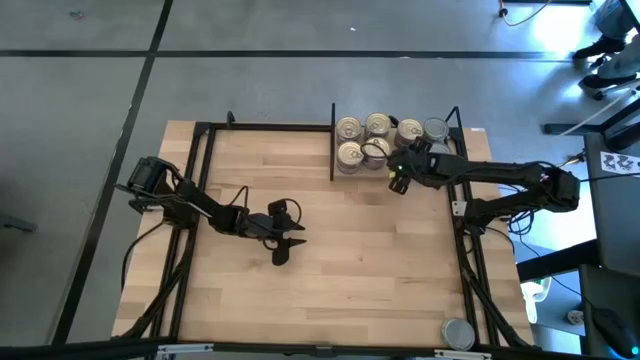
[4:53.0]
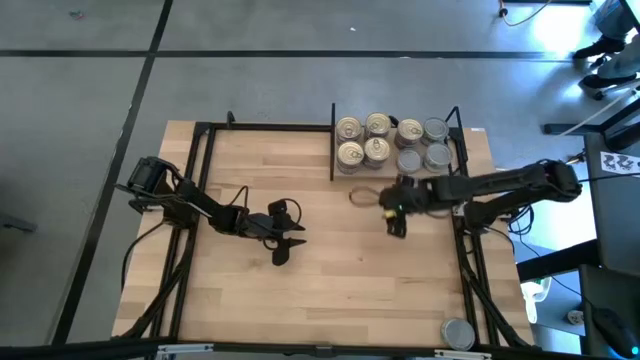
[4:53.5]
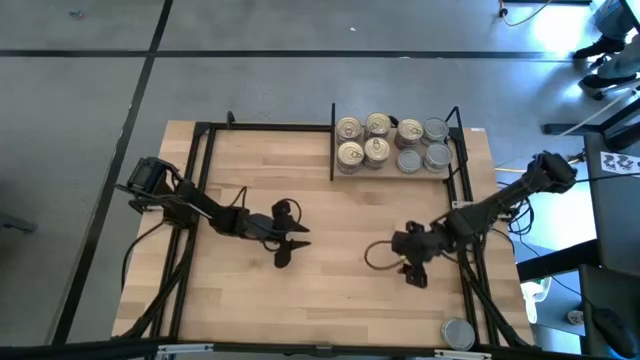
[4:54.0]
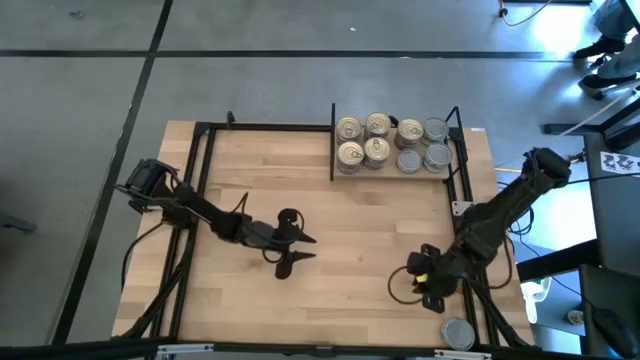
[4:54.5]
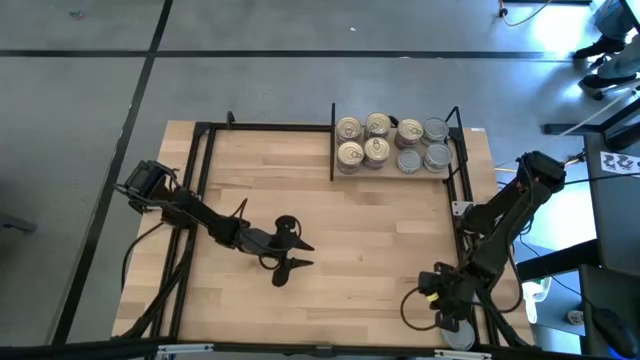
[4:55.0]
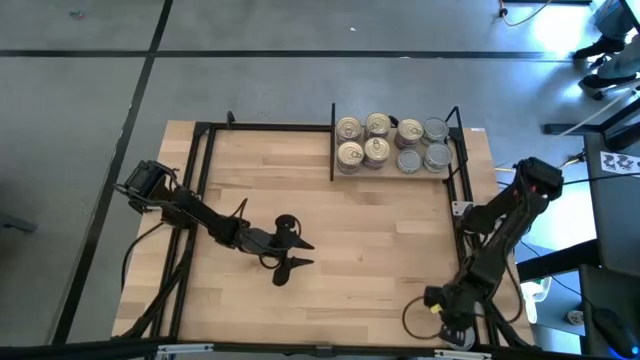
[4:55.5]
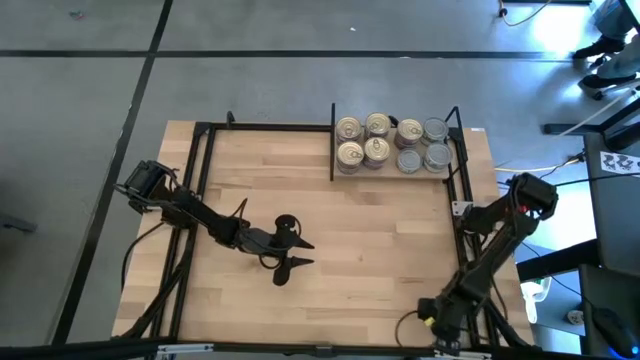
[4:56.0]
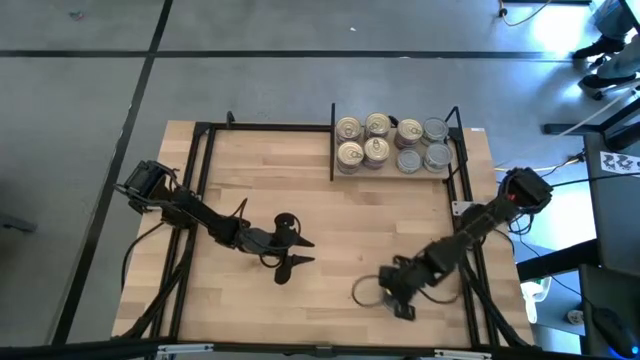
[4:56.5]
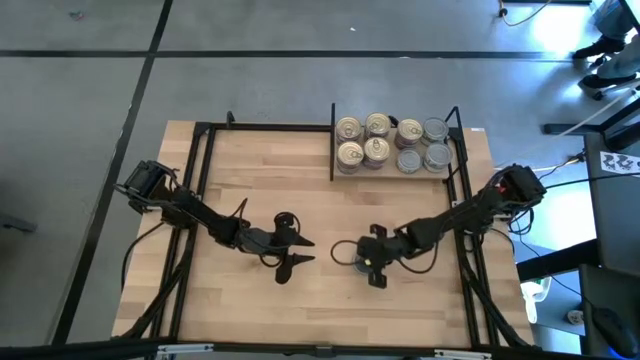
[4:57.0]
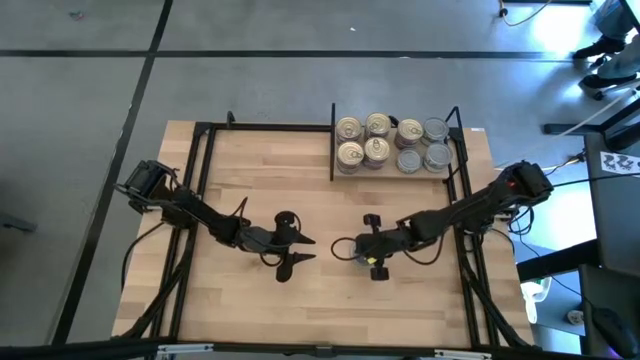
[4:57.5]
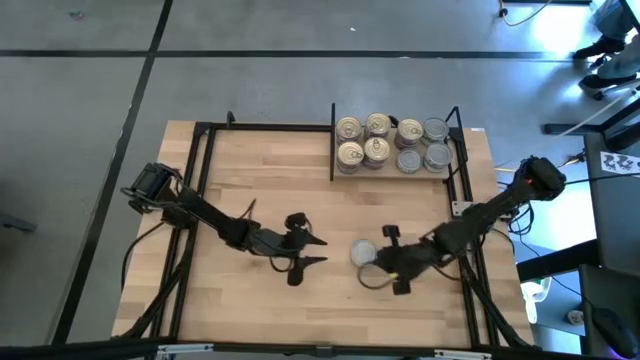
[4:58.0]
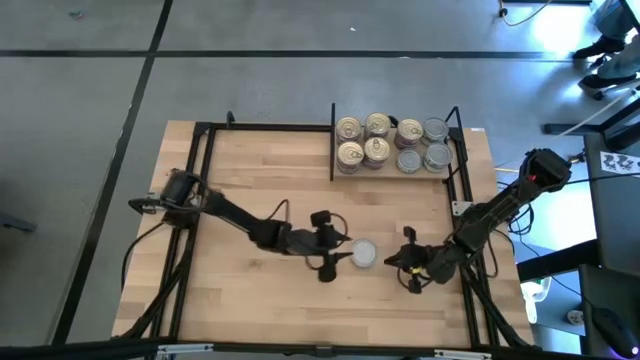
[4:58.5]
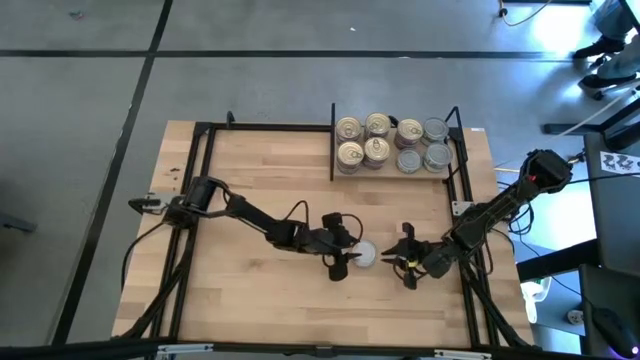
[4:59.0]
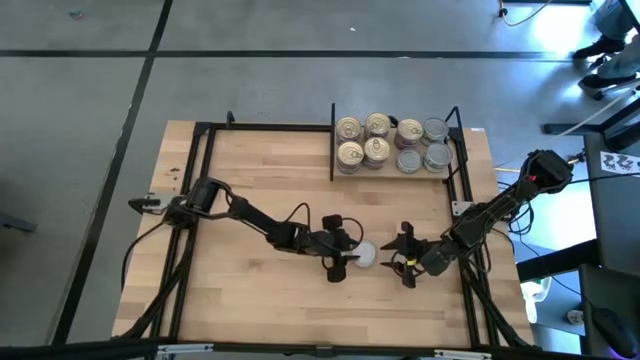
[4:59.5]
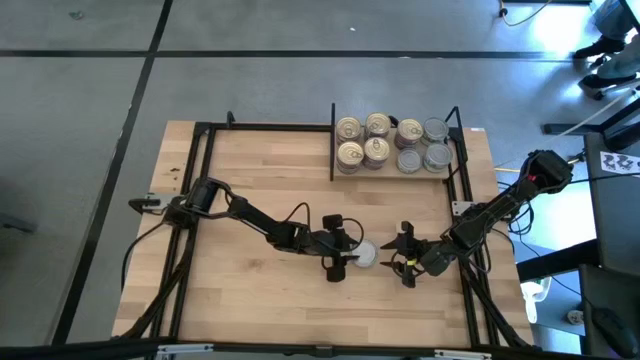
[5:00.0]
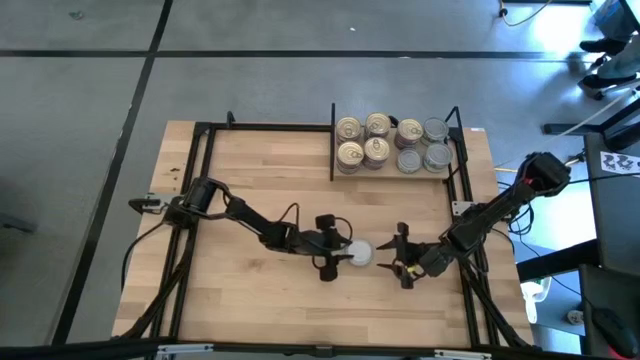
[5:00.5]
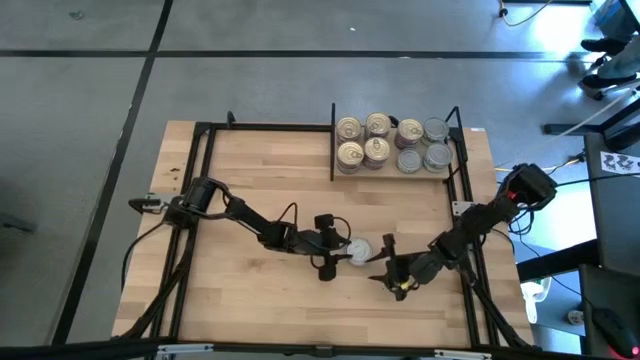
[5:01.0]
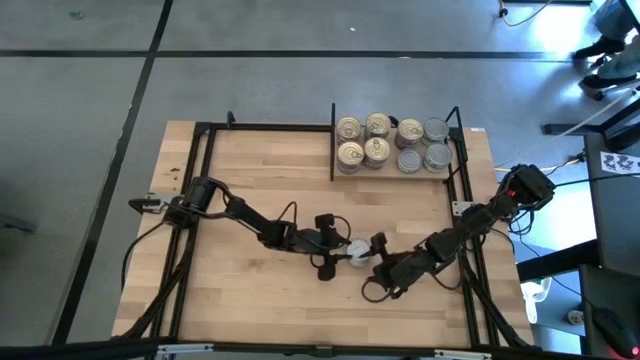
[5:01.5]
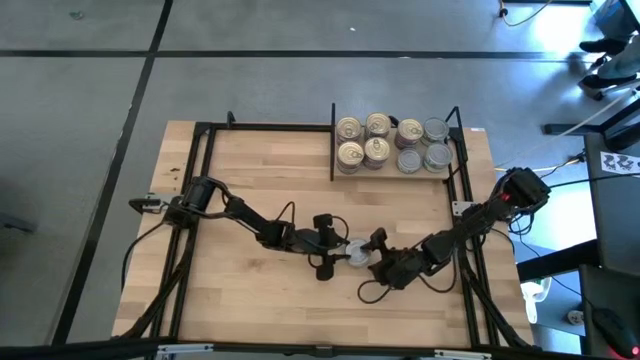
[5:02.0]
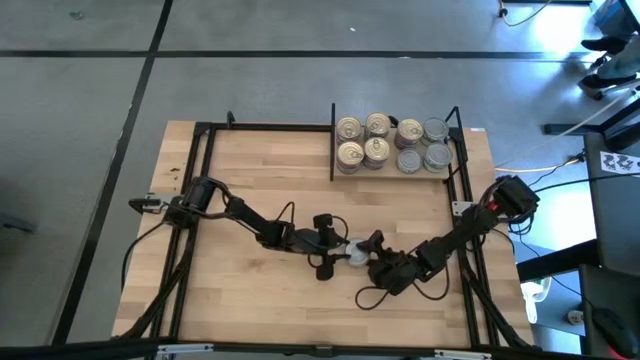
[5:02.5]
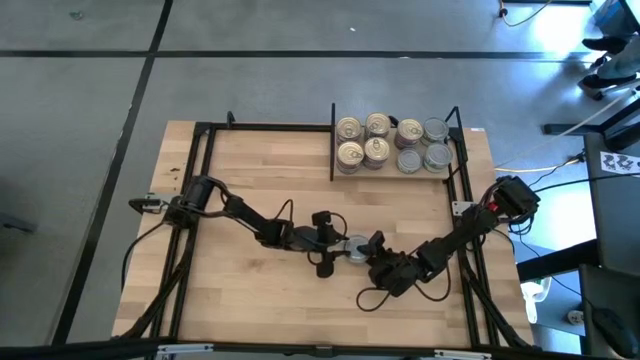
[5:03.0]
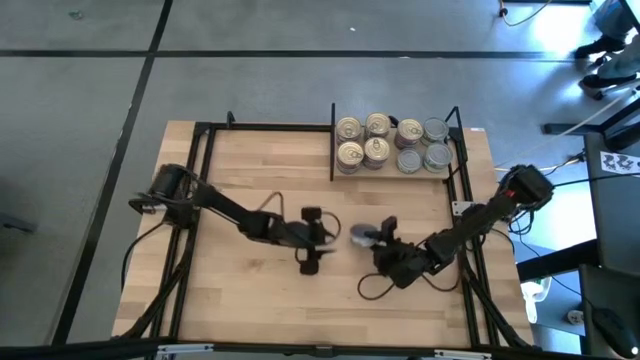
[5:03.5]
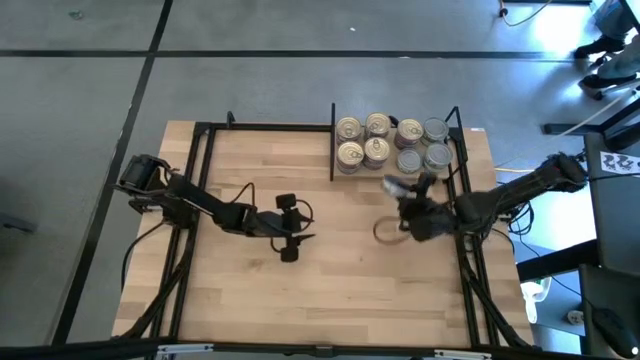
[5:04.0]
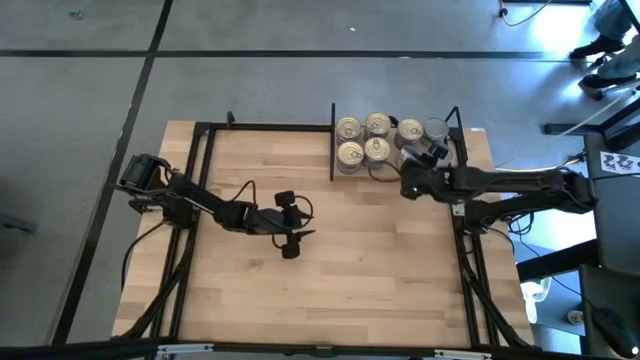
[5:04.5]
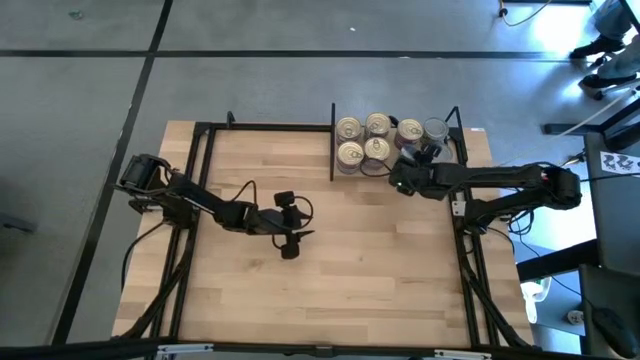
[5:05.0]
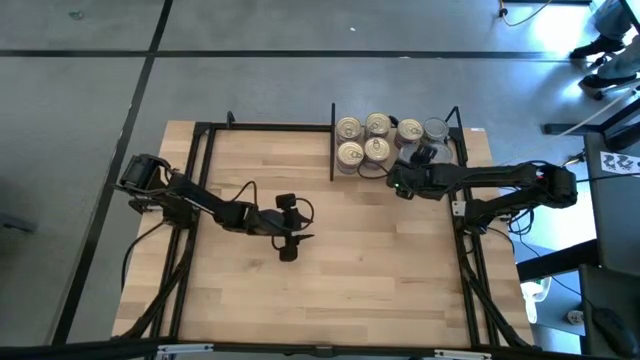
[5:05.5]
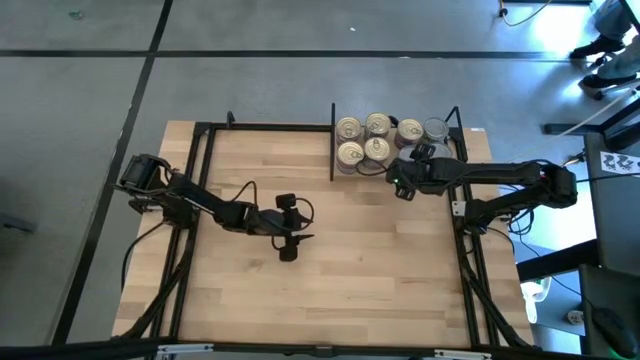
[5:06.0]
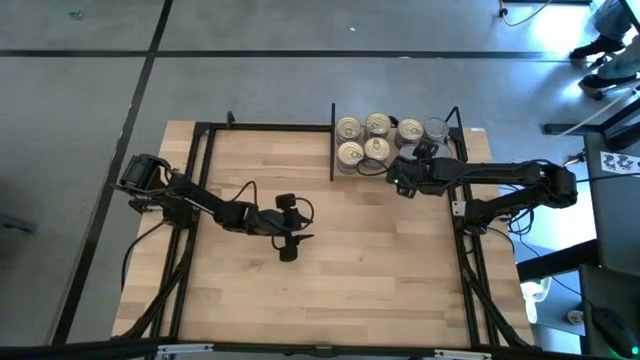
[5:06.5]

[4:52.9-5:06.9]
Task: Stack canned seafood by type on shelf
Stack the green tuna can on top of the green tuna can

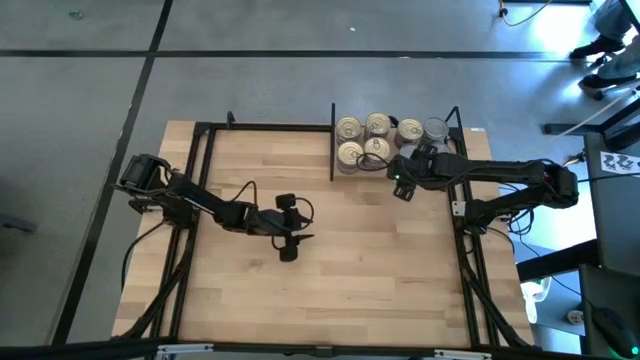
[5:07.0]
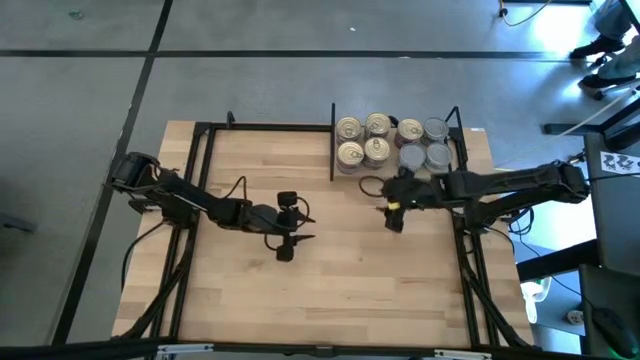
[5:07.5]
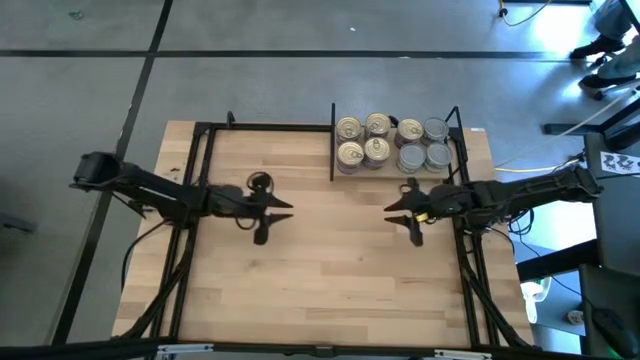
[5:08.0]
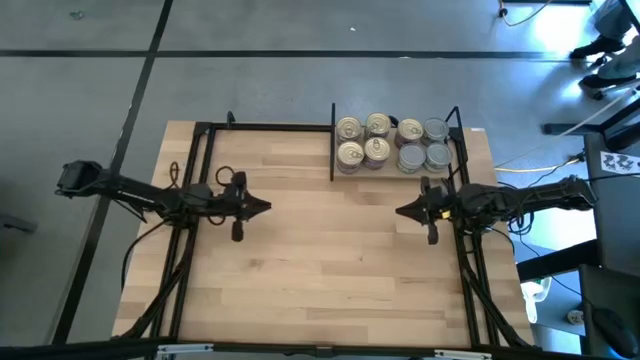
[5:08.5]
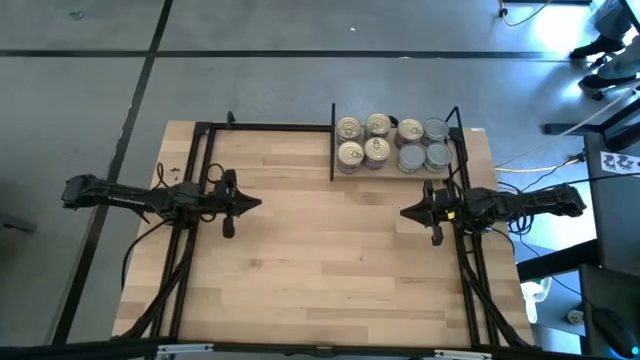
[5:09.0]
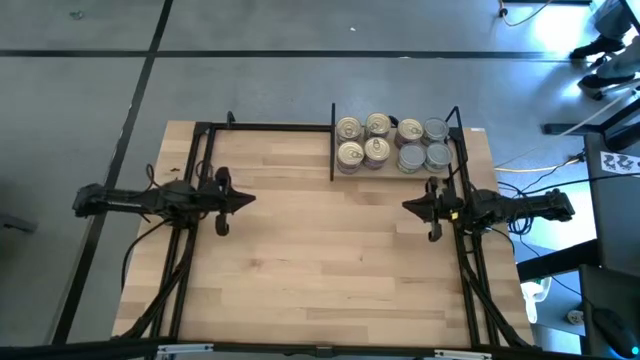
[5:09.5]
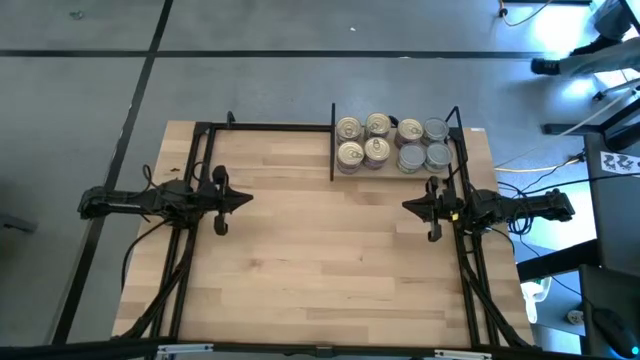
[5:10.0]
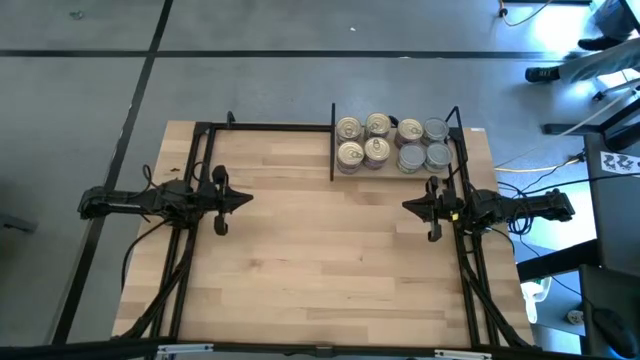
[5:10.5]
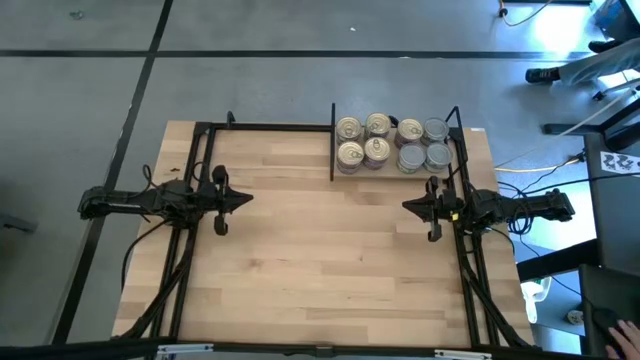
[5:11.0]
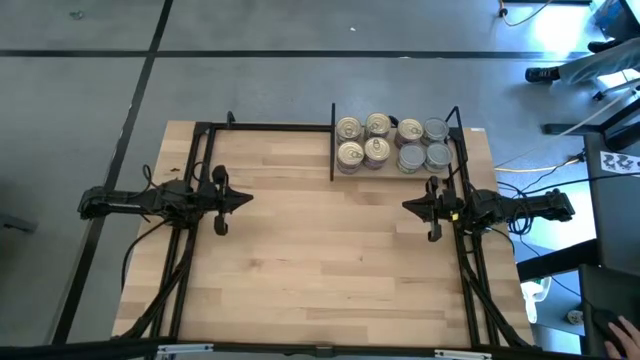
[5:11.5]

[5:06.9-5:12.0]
Return to Home Position

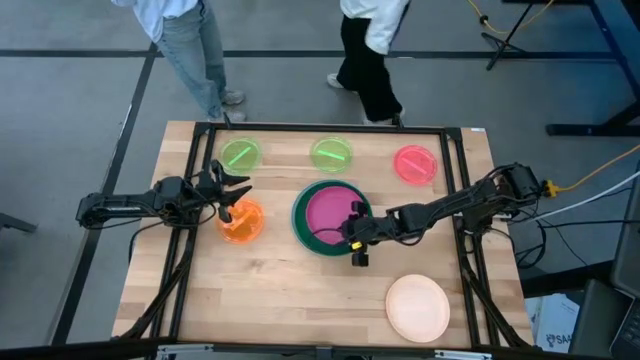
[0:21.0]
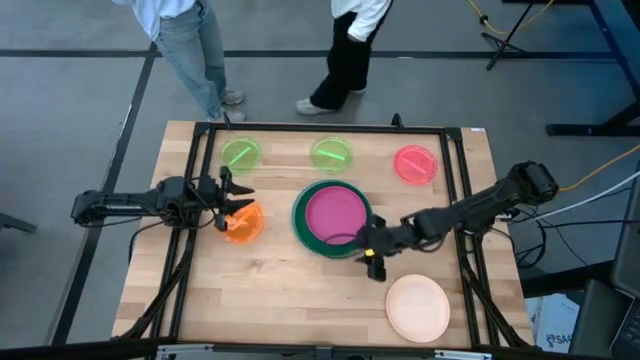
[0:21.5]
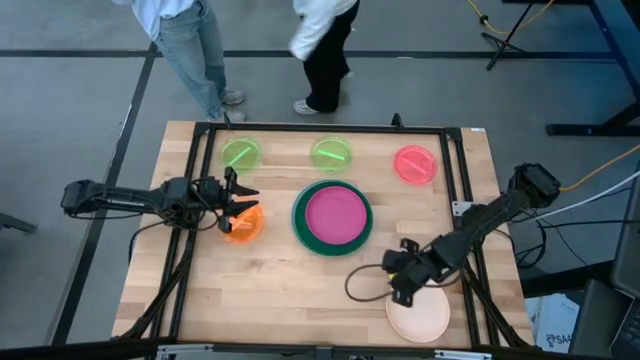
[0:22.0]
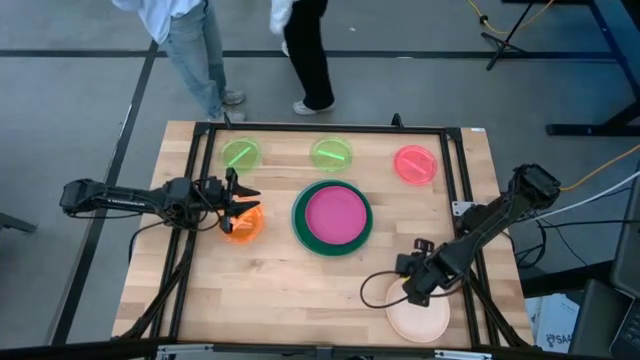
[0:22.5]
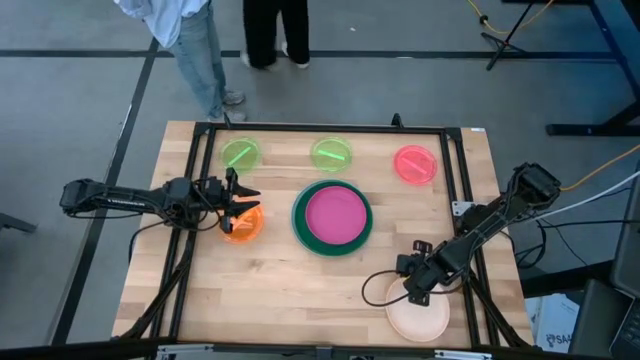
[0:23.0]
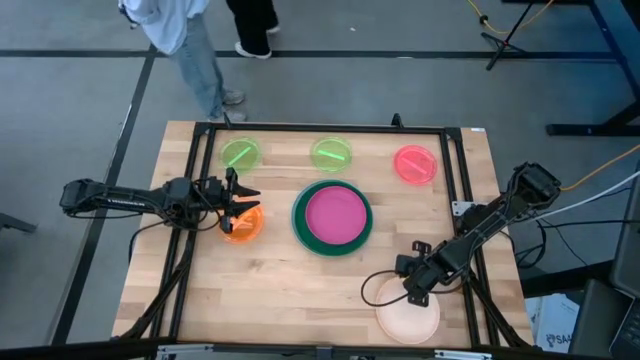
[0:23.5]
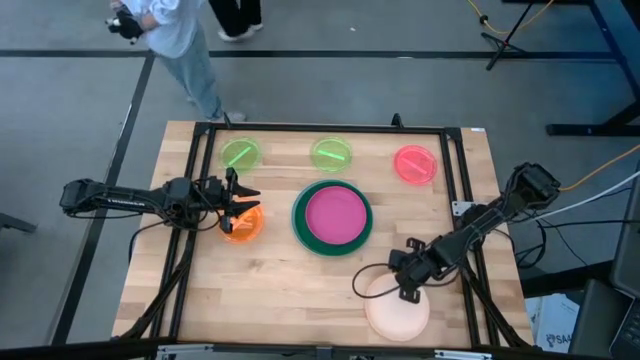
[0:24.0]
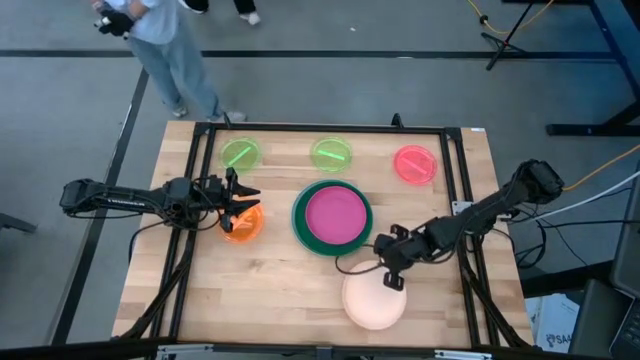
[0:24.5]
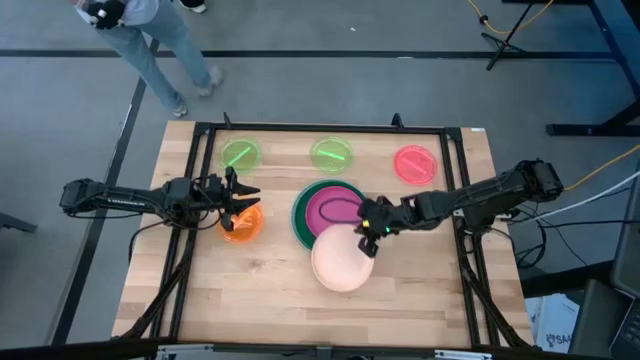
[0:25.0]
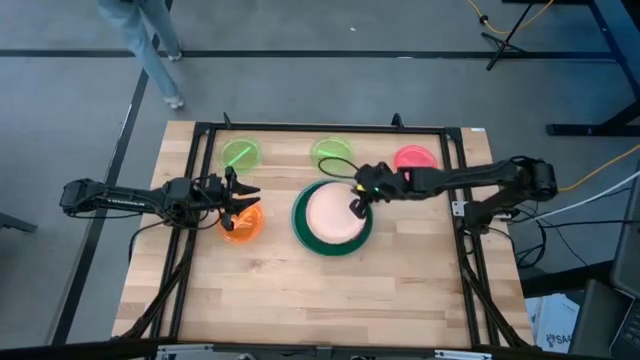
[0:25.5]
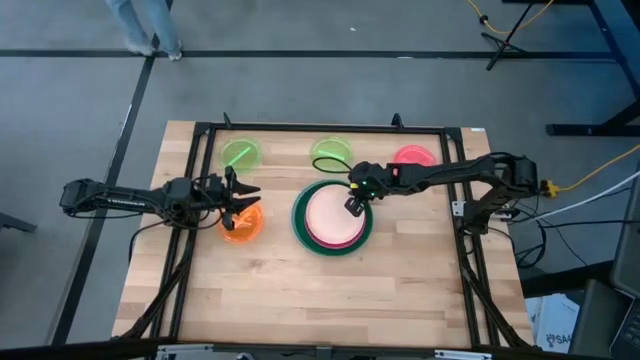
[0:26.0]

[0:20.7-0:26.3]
Task: Stack plastic plates
Stack the white plate on the pink plate
